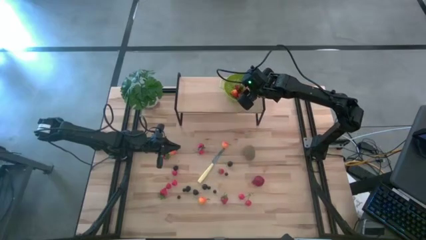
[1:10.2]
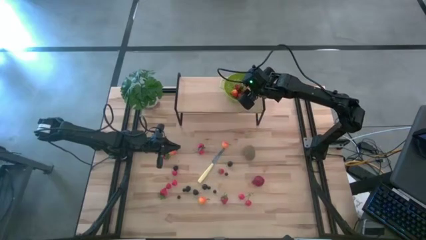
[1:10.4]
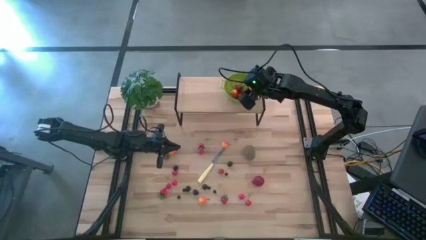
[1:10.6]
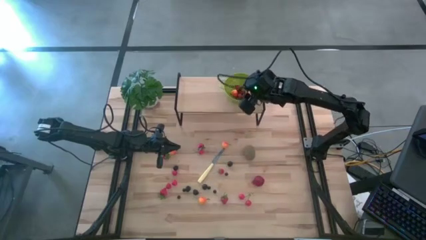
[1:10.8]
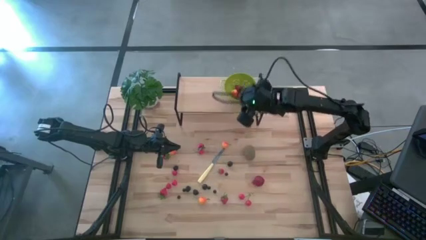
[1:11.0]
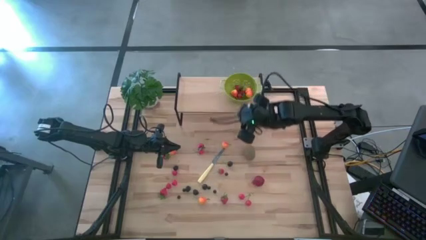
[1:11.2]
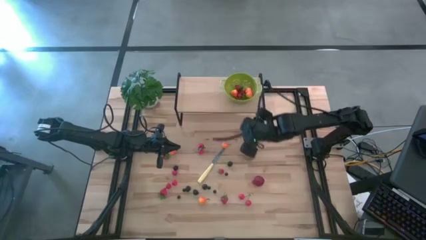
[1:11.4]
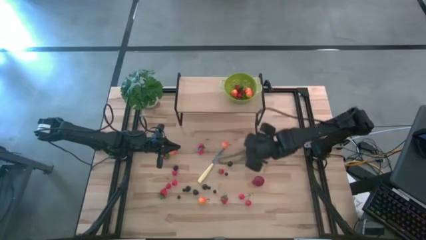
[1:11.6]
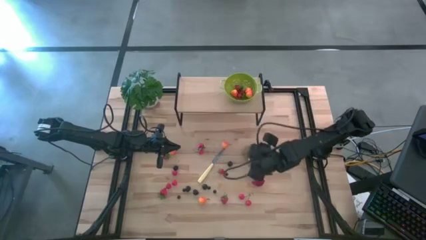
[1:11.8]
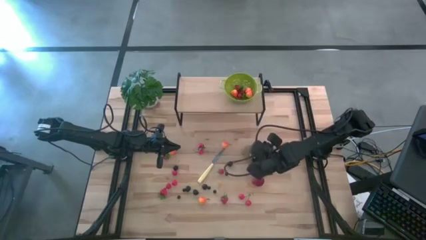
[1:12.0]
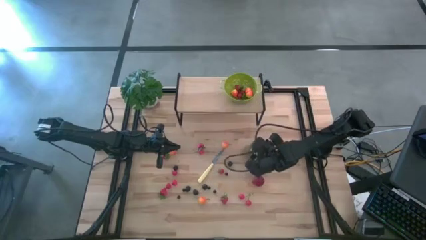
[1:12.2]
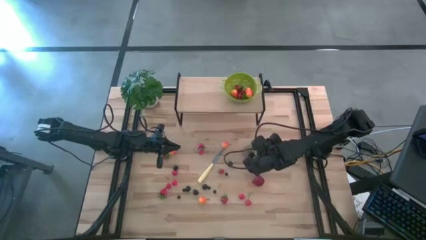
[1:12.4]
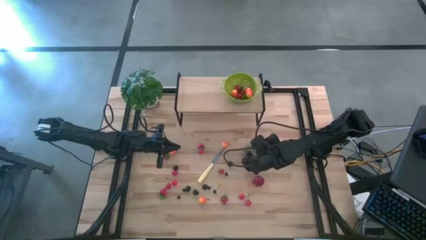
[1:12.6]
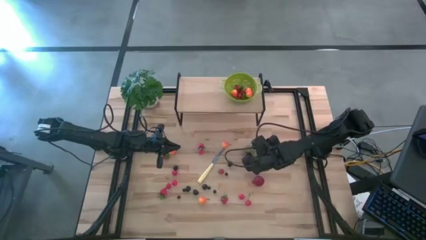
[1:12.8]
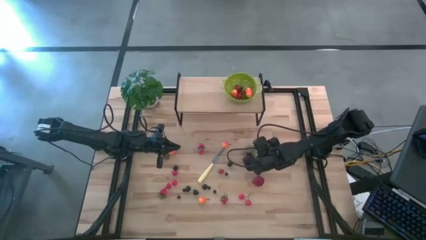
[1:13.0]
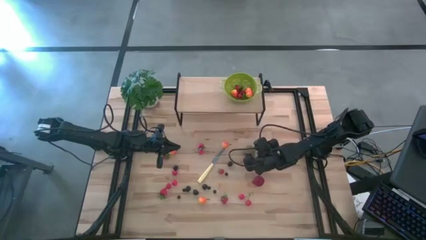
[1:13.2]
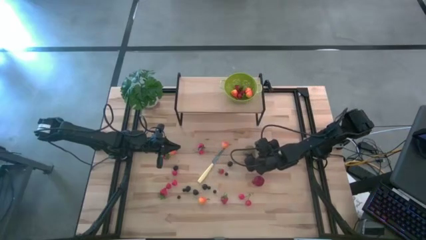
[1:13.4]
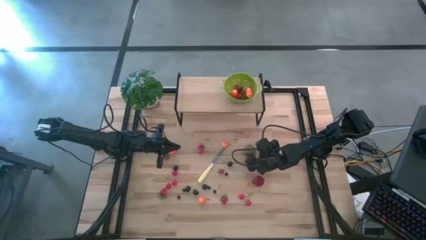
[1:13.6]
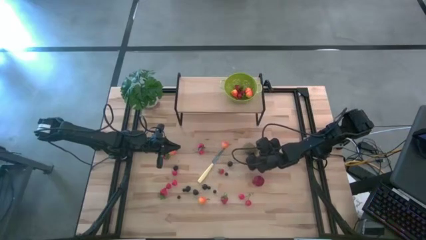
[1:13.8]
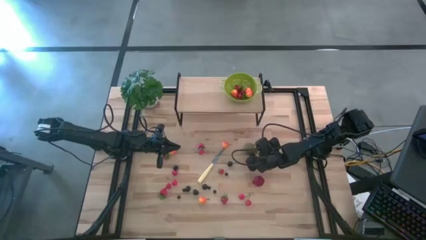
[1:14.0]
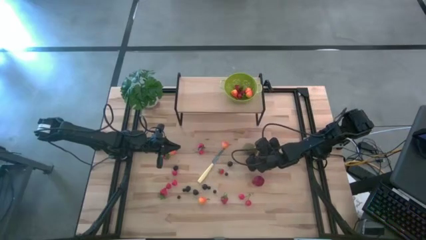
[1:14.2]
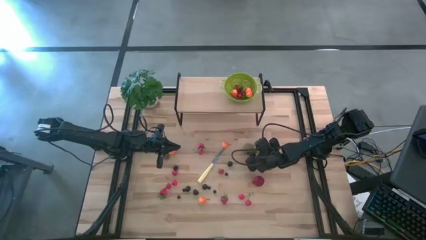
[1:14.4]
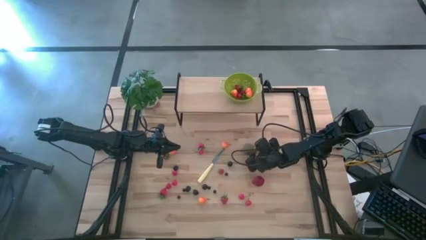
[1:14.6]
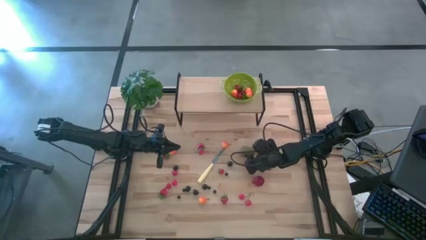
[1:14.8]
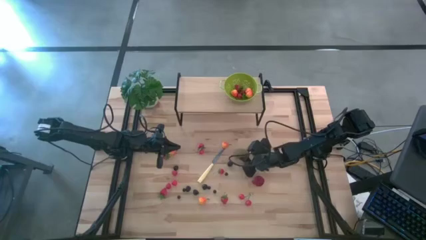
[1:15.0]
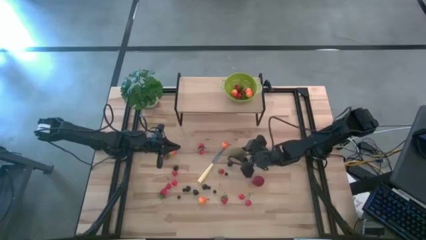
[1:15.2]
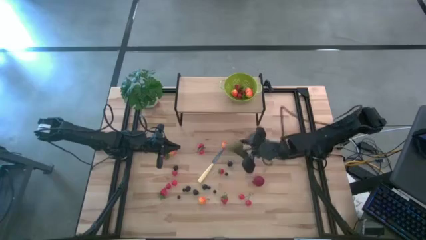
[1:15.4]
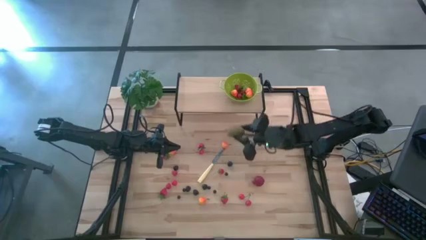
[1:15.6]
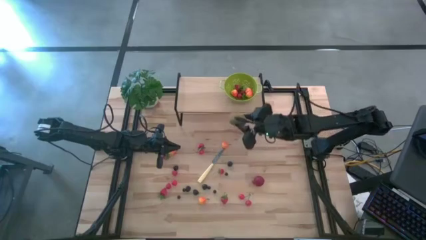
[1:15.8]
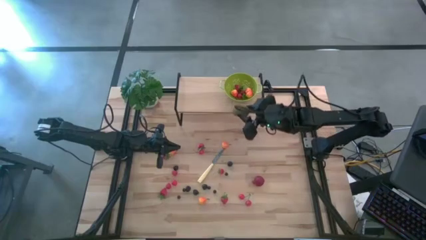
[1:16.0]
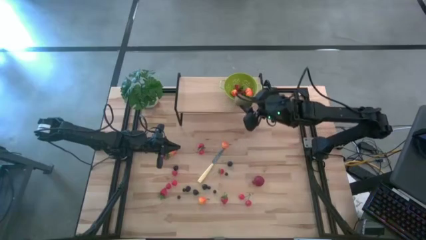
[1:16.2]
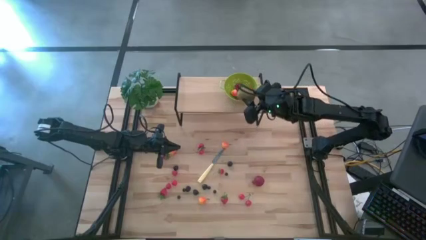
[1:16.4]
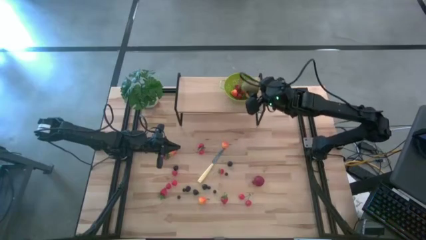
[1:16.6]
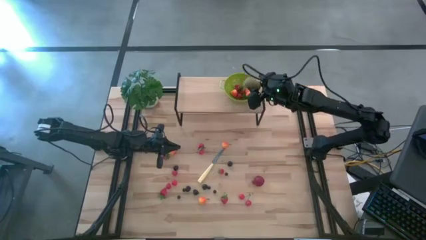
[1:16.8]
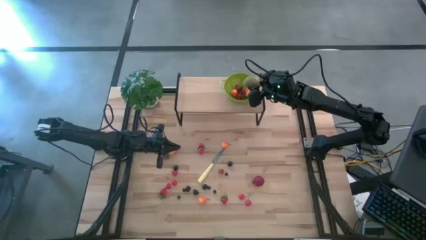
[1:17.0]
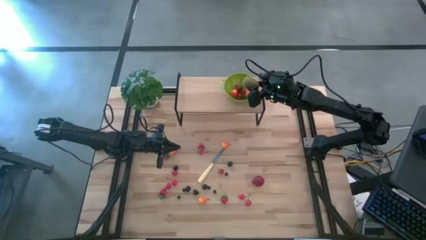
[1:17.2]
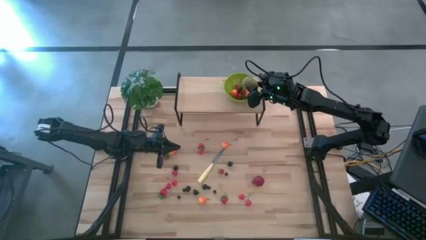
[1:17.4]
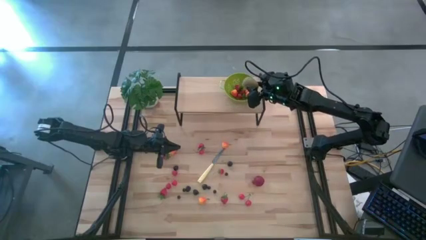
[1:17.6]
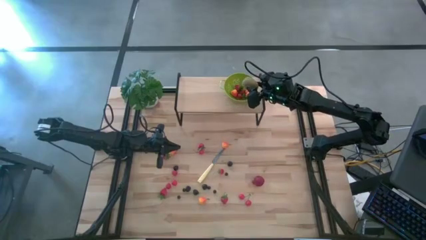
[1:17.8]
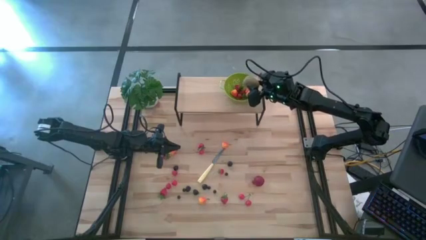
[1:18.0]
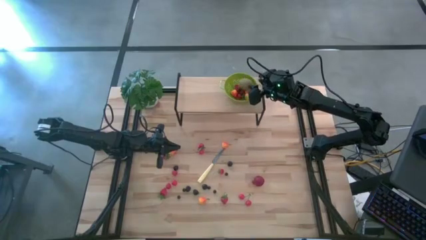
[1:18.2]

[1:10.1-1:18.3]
Task: Pick & Place Fruit
Put the kiwi into the strainer bowl

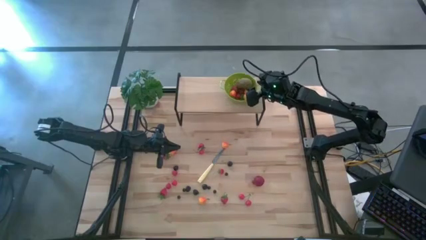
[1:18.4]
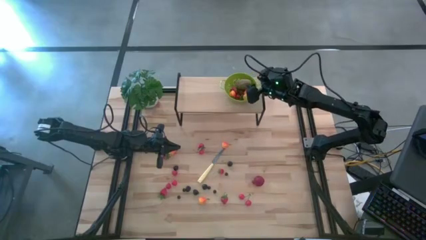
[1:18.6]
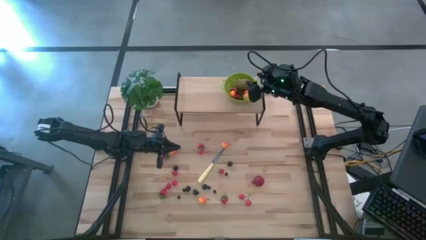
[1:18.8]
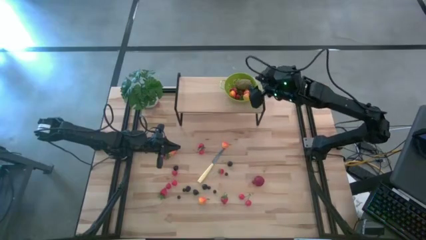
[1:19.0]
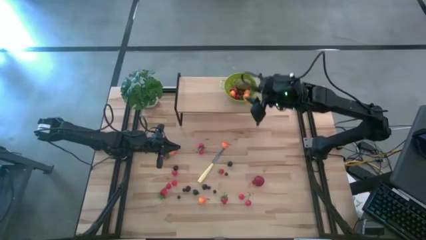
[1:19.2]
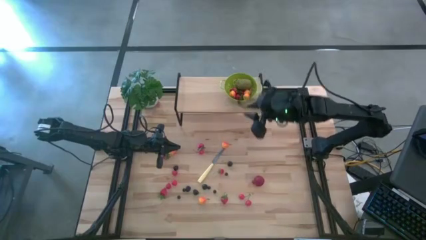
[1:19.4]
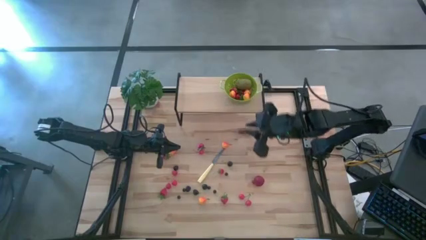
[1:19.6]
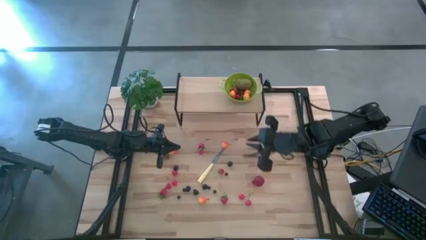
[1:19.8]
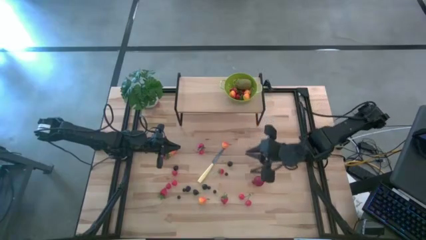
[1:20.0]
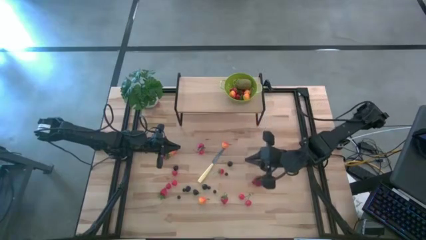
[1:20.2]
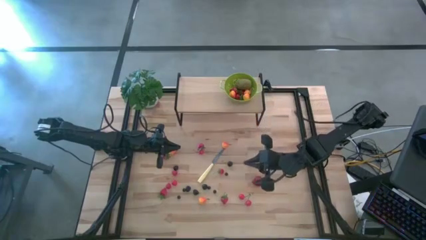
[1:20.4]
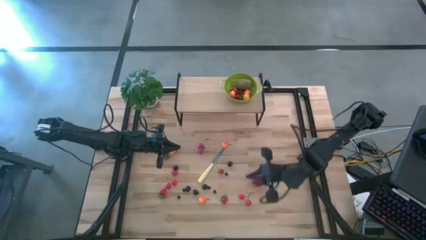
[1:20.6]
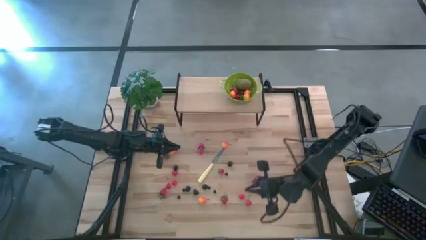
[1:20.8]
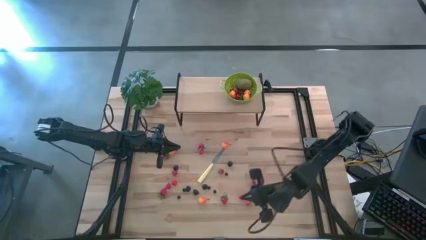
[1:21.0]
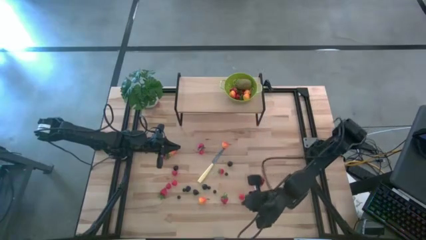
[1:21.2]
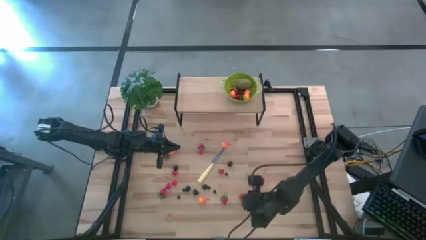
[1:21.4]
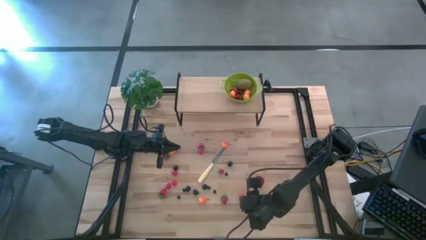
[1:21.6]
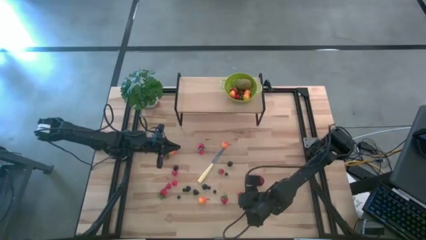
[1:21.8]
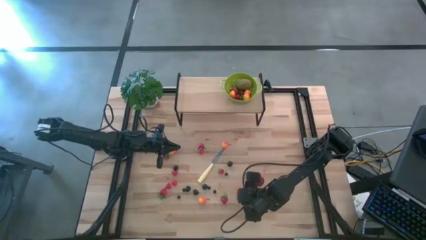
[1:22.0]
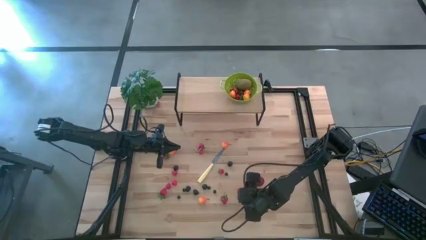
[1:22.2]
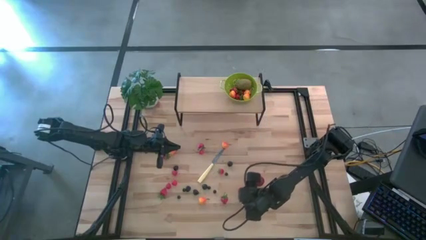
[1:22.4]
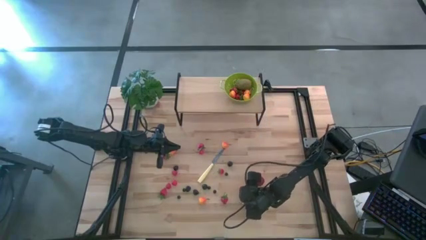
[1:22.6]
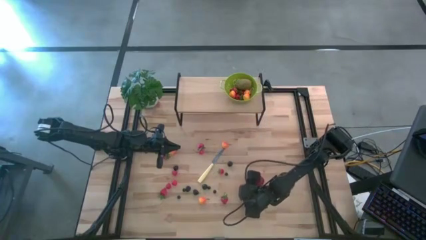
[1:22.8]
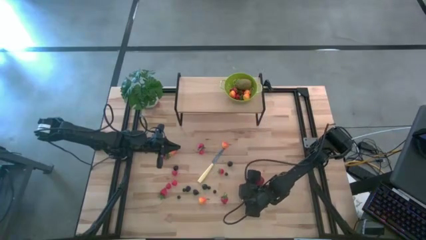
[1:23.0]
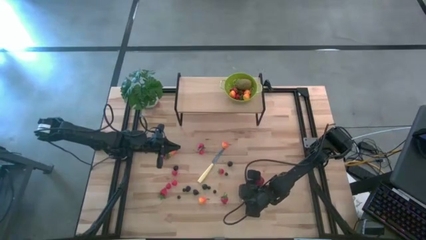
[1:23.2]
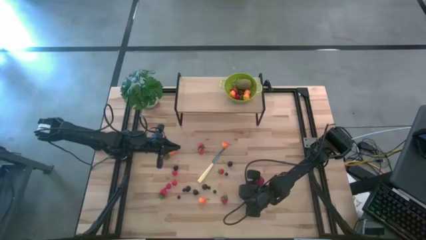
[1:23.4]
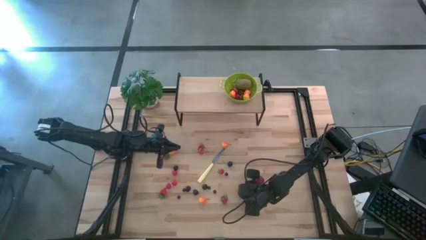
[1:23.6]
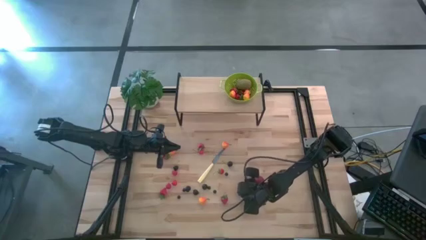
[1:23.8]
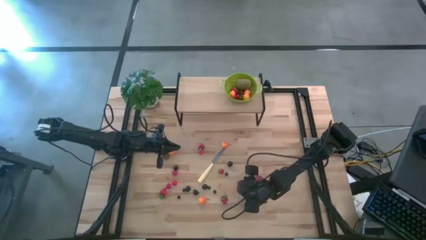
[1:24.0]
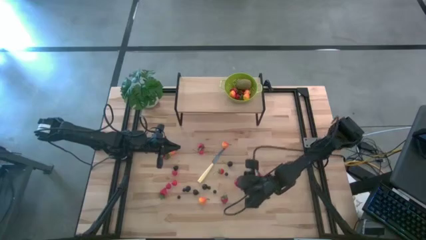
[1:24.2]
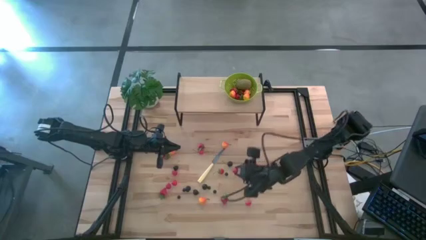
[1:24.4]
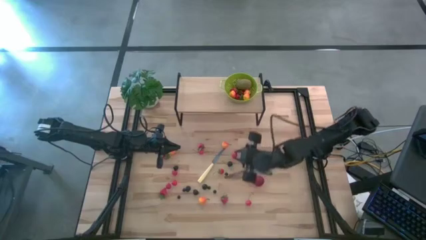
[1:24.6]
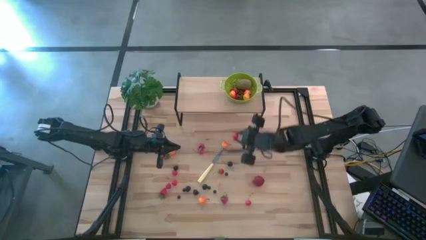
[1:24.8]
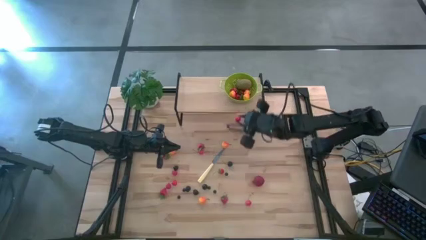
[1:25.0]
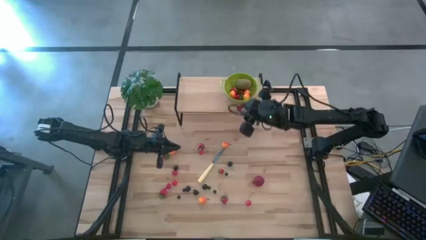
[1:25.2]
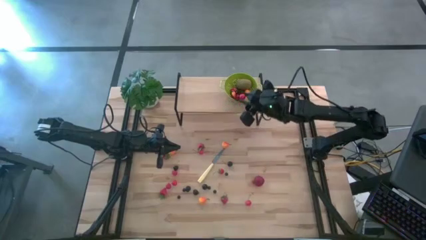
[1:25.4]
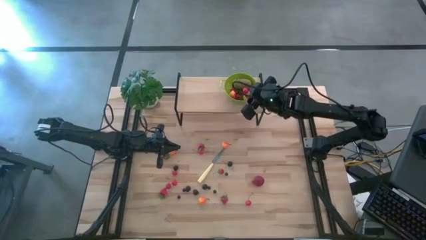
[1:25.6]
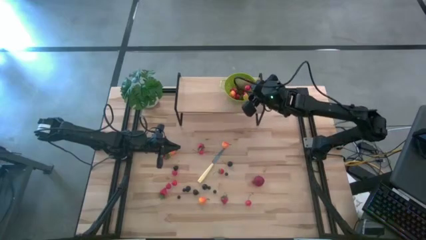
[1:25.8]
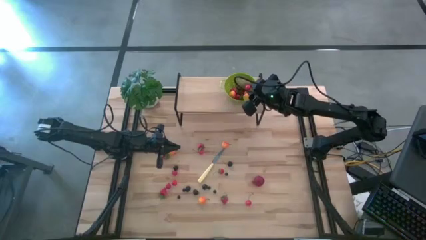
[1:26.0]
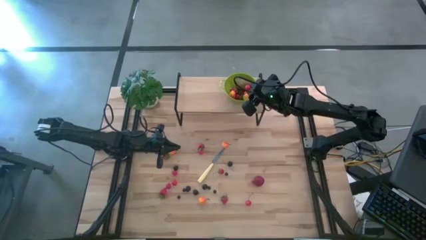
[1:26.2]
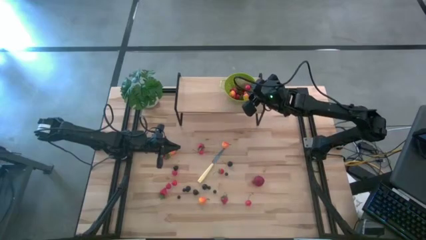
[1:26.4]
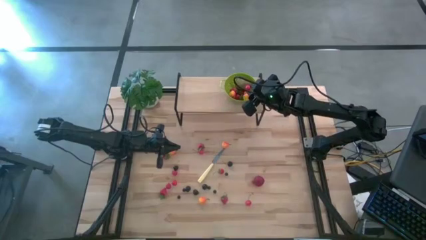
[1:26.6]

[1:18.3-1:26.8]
Put the red cherry into the strainer bowl
